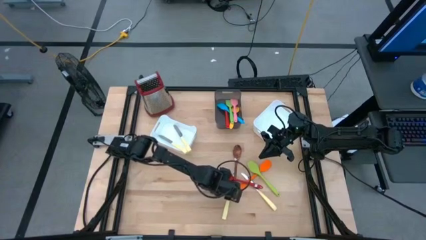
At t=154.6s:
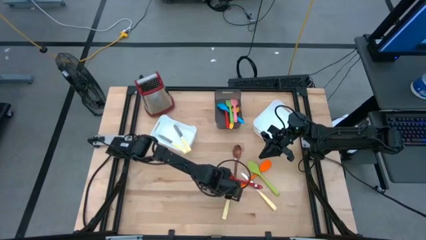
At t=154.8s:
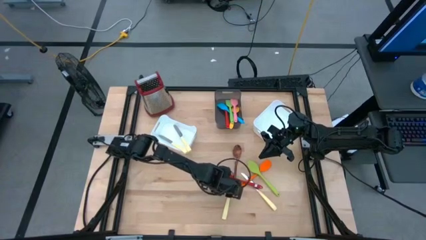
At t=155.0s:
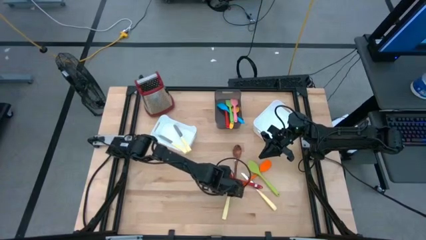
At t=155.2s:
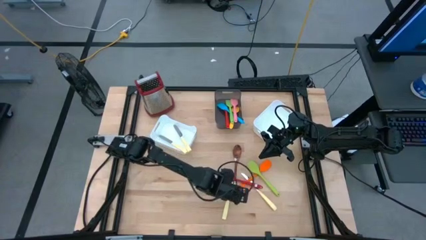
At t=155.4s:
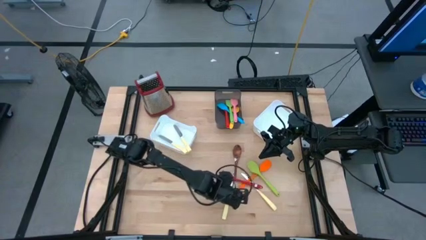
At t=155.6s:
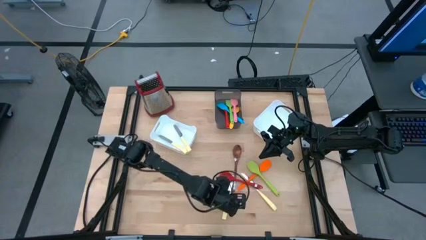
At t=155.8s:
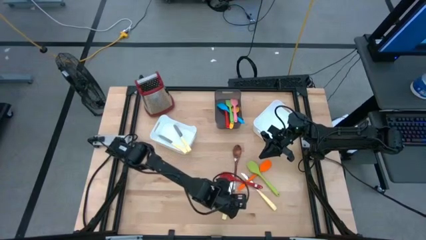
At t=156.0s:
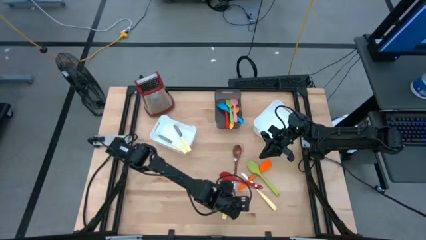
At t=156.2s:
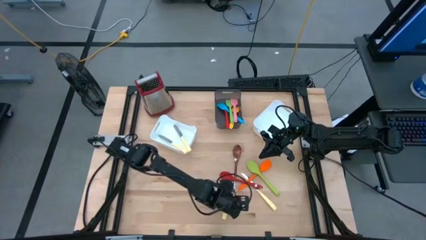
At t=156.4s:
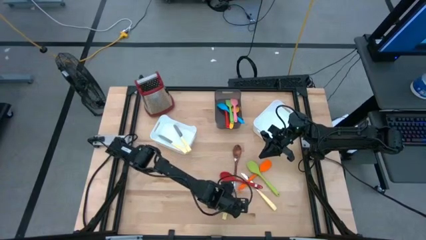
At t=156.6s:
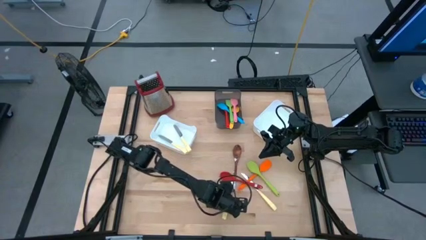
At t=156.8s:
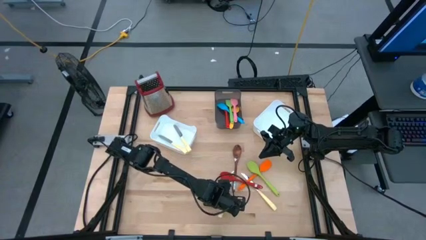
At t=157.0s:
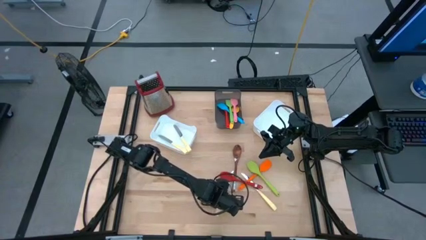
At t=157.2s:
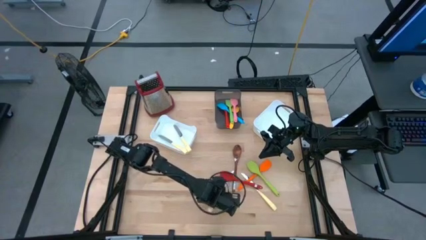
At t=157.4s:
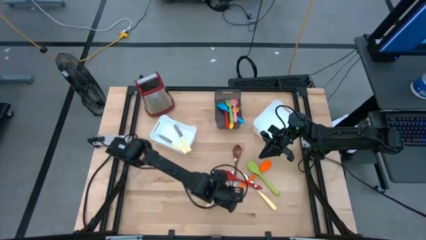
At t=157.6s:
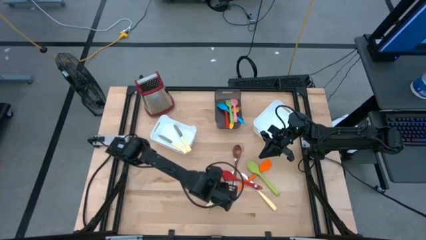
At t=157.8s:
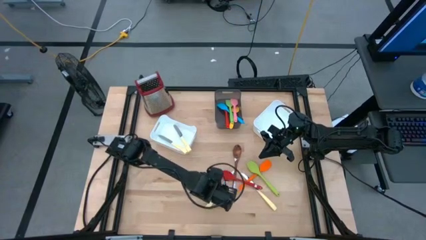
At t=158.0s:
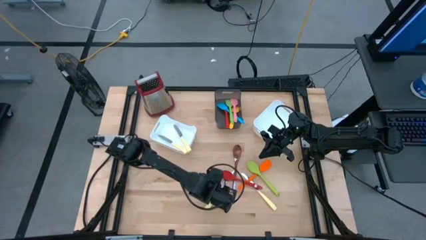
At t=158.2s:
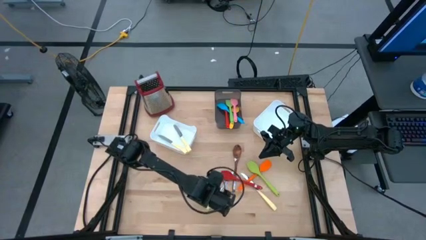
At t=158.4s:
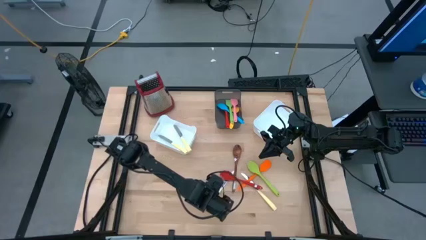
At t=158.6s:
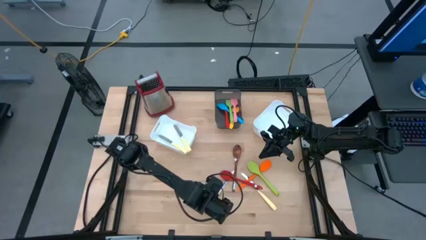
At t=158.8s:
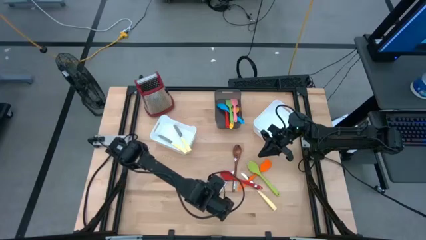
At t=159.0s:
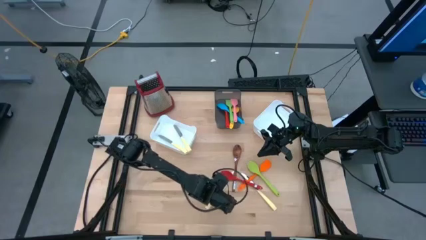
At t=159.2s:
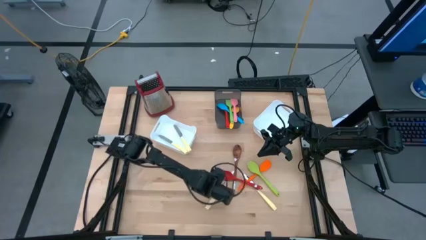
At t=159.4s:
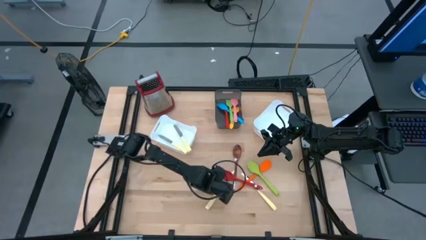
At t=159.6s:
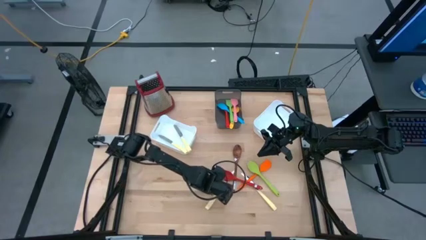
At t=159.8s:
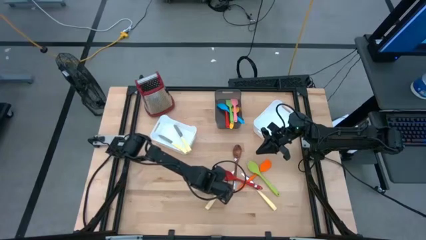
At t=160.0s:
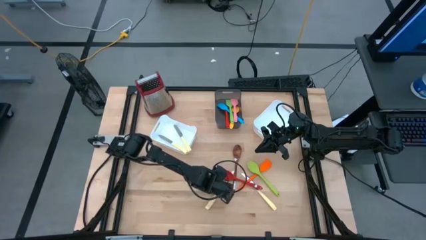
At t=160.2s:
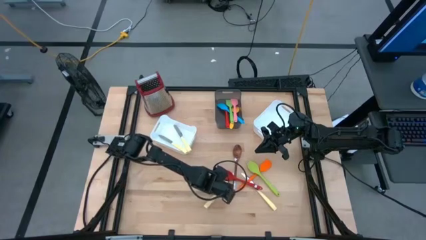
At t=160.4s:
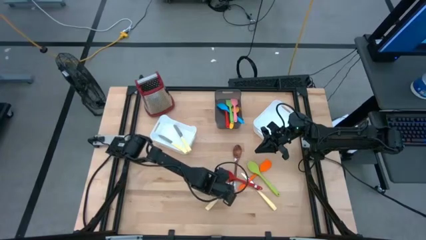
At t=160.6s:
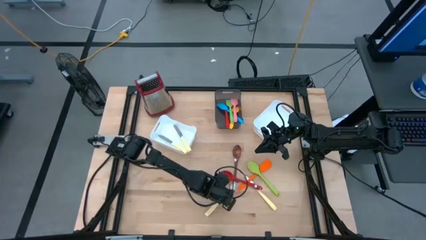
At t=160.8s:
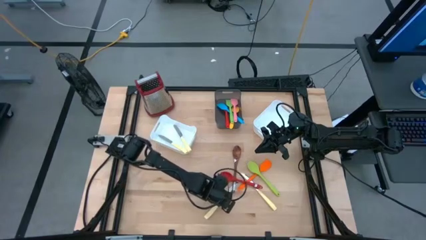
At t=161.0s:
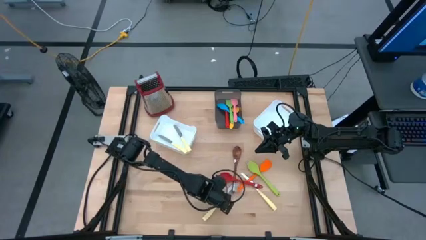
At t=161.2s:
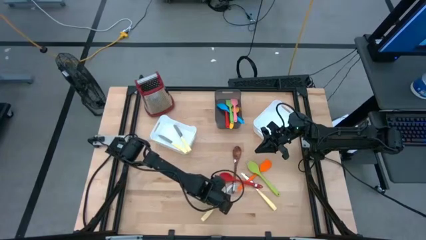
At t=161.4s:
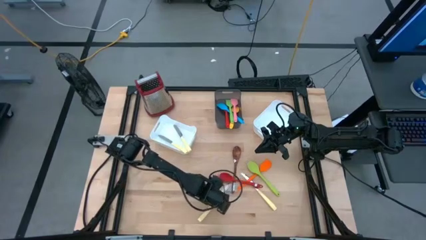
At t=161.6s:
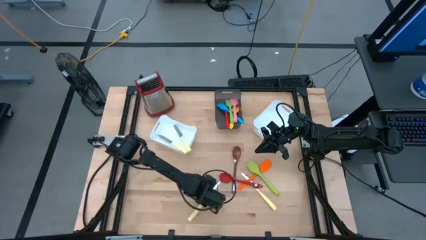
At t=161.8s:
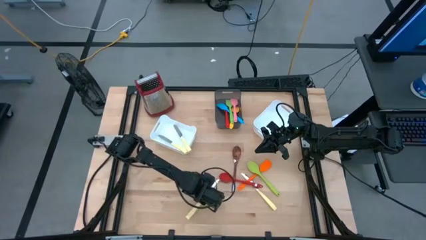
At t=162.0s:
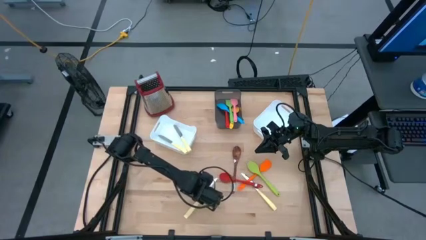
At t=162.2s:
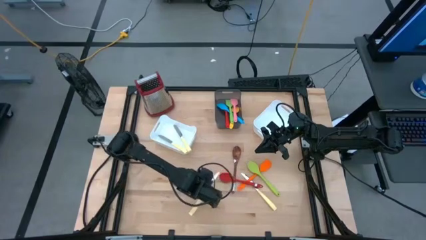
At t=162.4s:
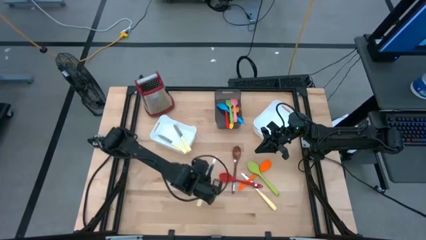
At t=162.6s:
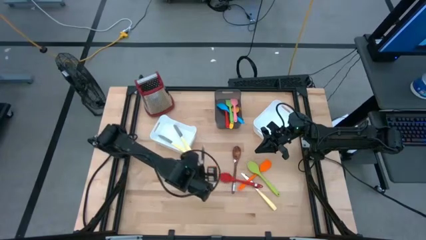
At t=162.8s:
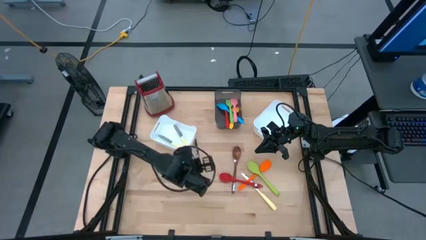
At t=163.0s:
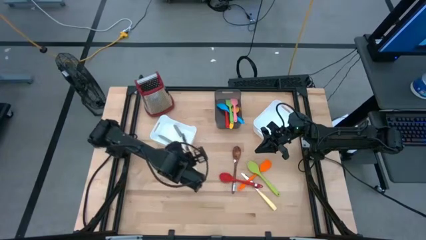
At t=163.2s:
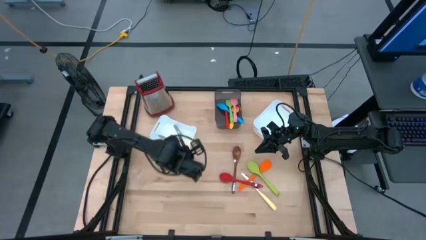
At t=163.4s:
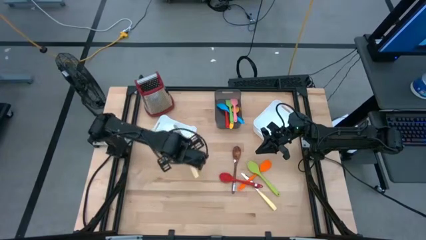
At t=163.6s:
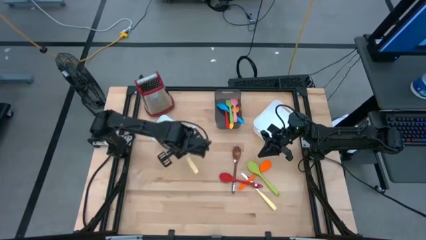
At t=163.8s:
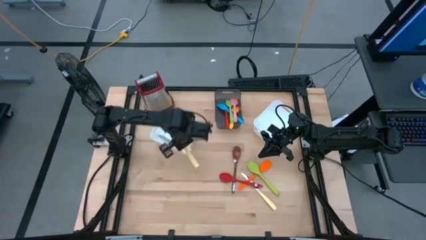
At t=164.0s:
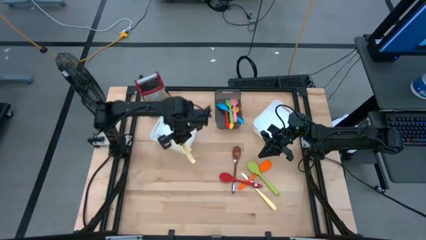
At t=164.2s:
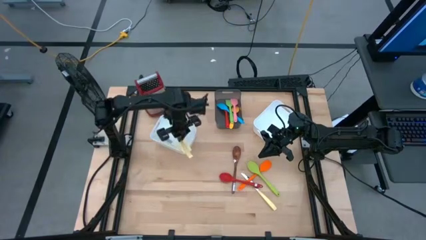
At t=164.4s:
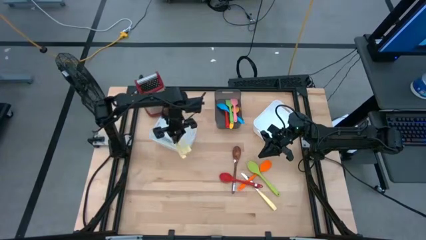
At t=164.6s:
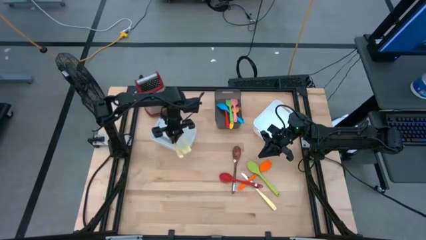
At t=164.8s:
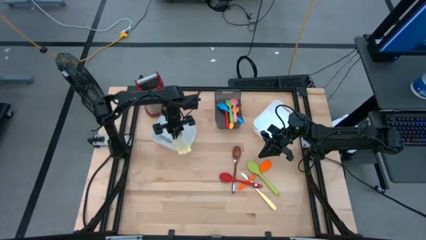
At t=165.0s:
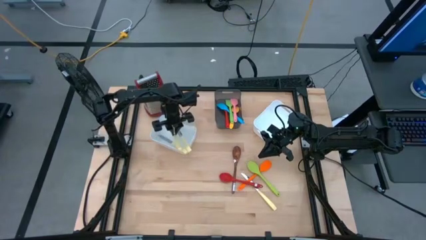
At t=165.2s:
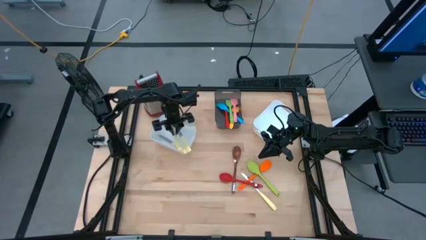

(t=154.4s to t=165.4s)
Task: Pick & Place Kitchen Items
Put the yellow knife into the left white bin
